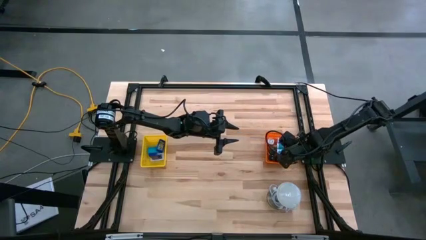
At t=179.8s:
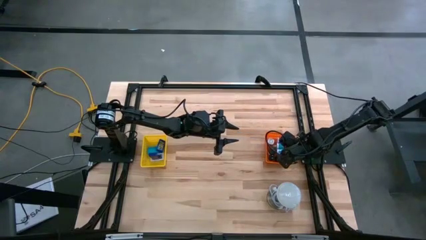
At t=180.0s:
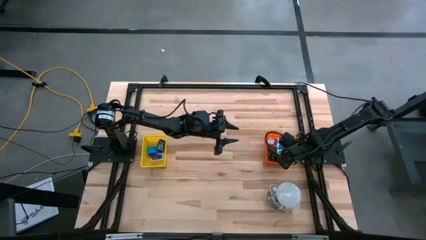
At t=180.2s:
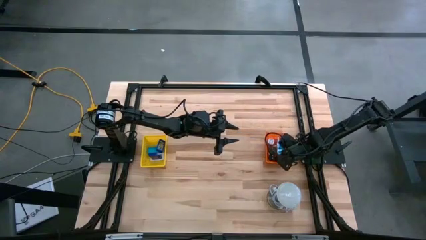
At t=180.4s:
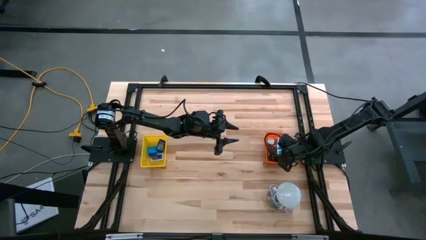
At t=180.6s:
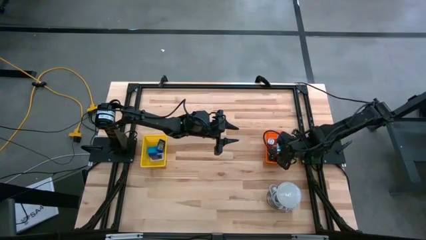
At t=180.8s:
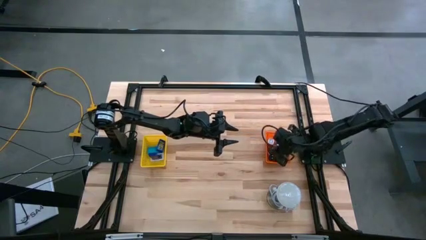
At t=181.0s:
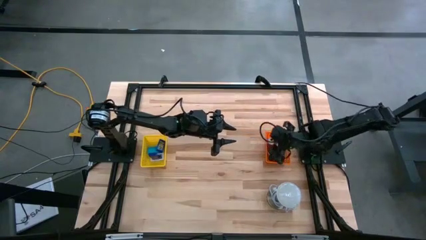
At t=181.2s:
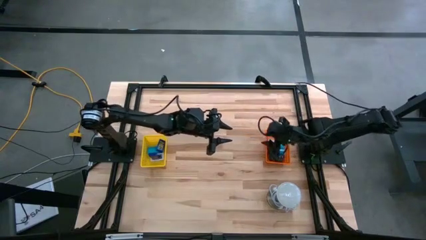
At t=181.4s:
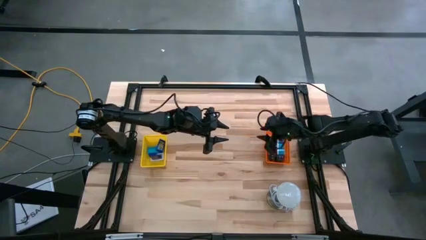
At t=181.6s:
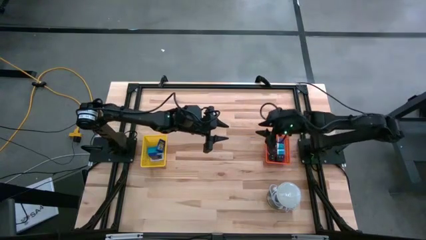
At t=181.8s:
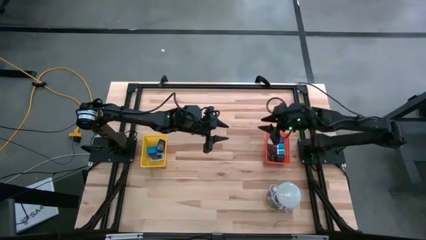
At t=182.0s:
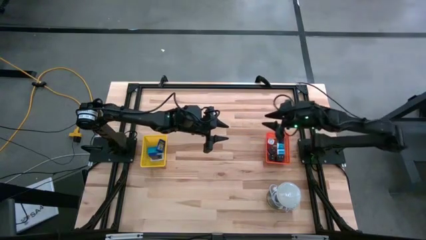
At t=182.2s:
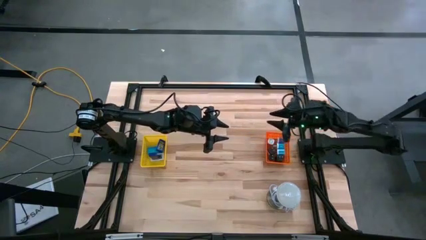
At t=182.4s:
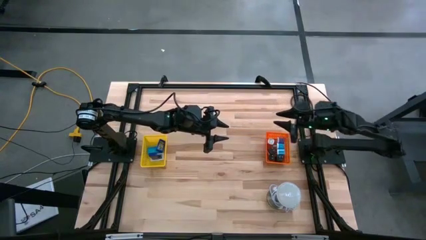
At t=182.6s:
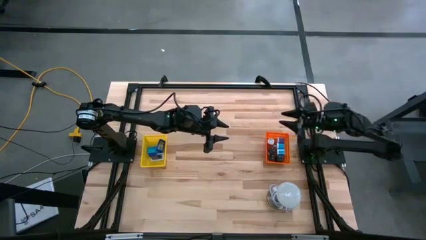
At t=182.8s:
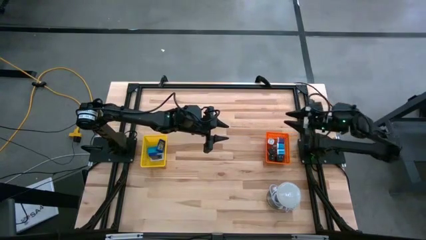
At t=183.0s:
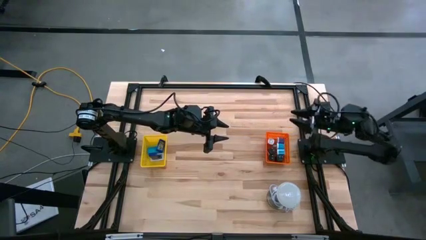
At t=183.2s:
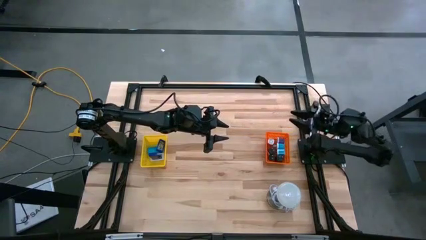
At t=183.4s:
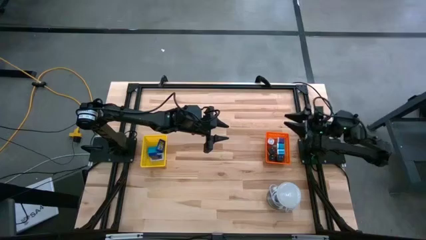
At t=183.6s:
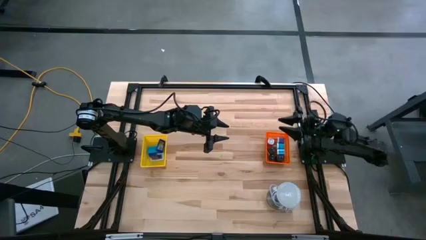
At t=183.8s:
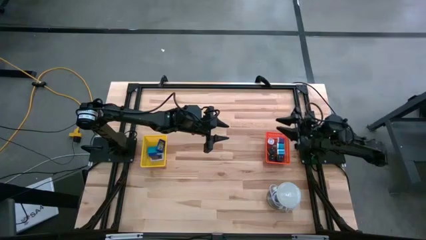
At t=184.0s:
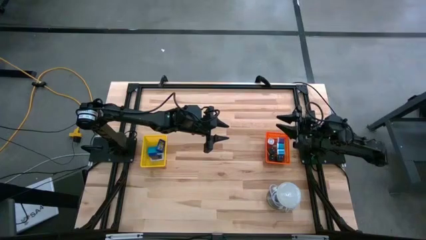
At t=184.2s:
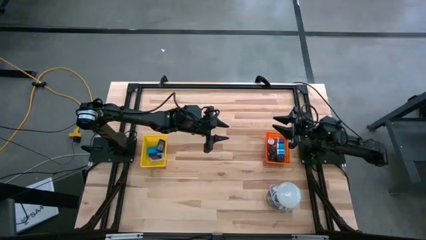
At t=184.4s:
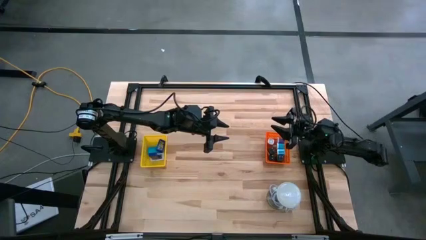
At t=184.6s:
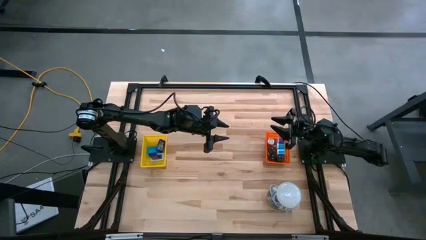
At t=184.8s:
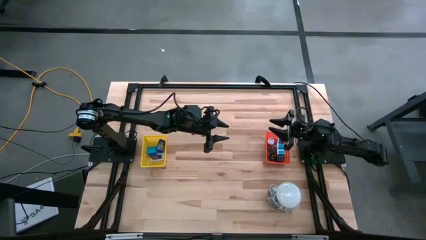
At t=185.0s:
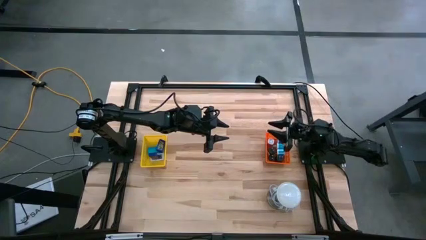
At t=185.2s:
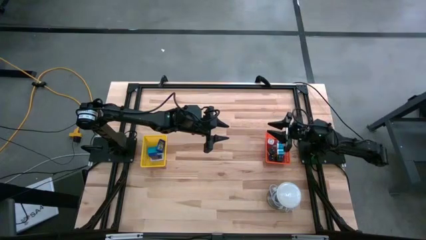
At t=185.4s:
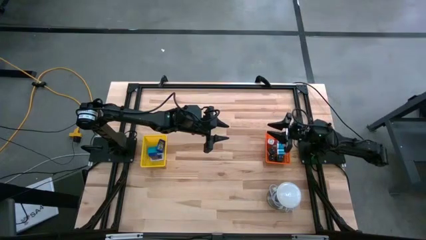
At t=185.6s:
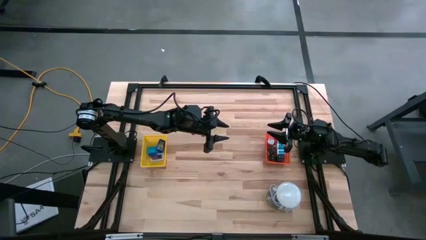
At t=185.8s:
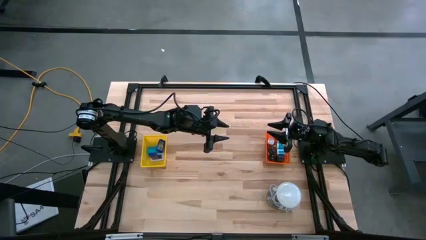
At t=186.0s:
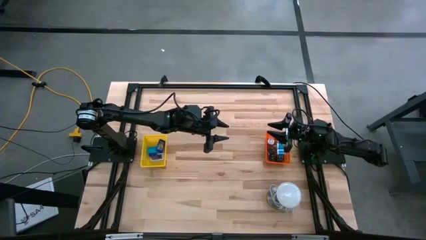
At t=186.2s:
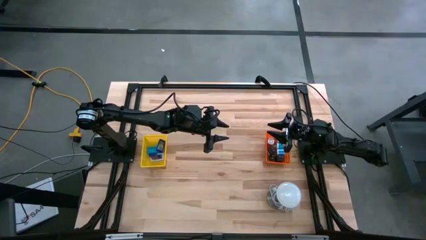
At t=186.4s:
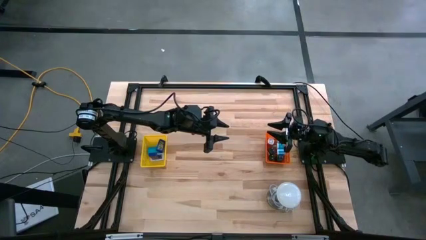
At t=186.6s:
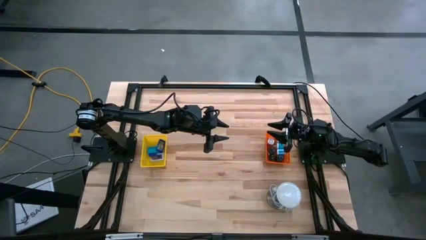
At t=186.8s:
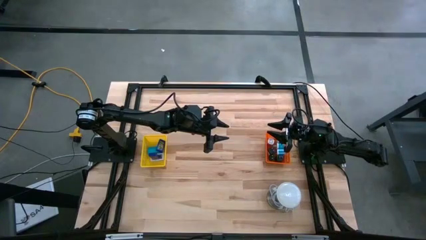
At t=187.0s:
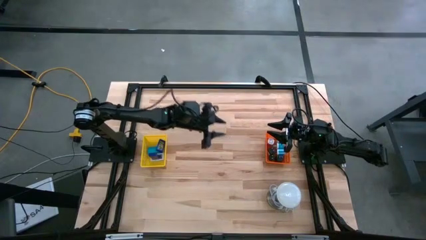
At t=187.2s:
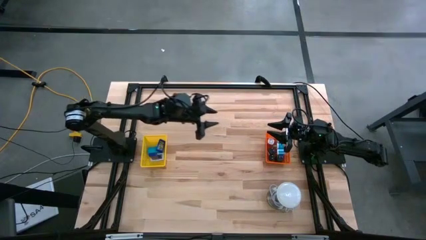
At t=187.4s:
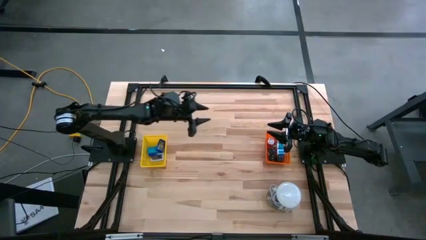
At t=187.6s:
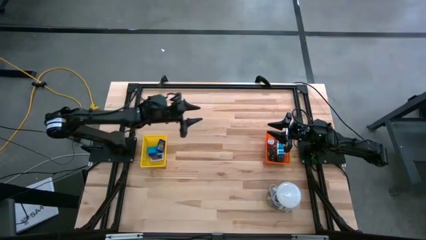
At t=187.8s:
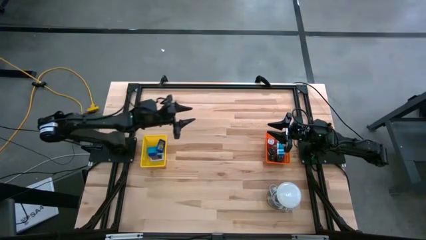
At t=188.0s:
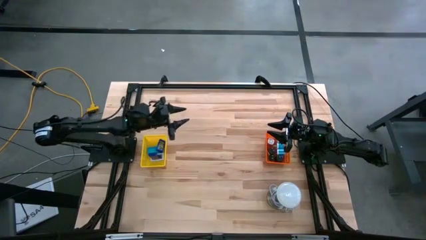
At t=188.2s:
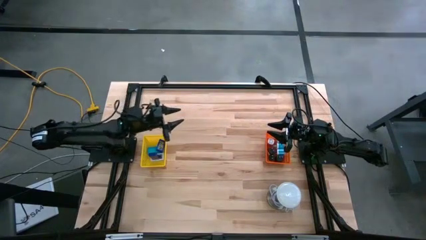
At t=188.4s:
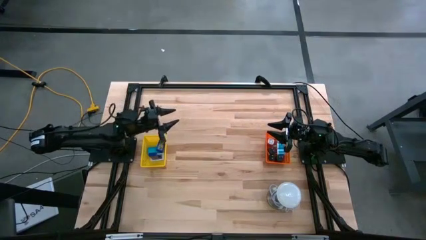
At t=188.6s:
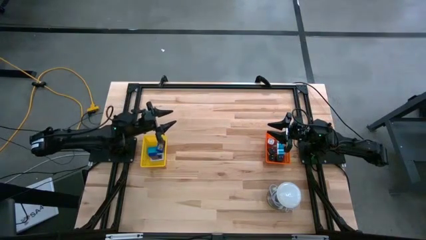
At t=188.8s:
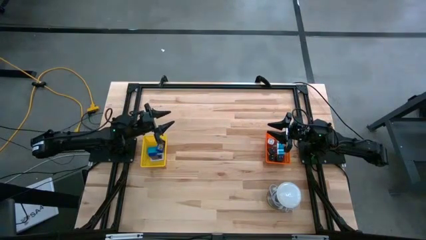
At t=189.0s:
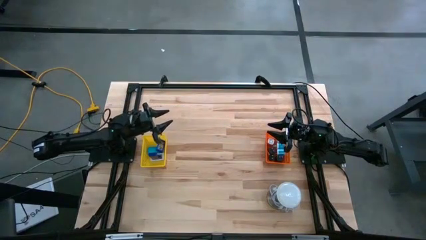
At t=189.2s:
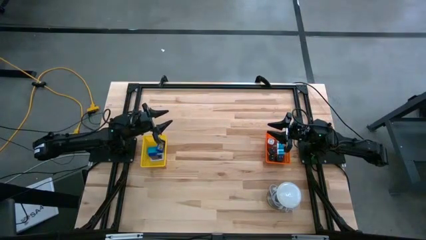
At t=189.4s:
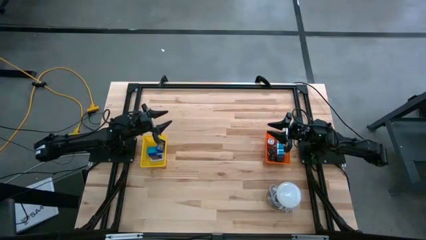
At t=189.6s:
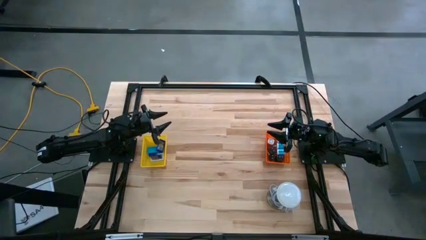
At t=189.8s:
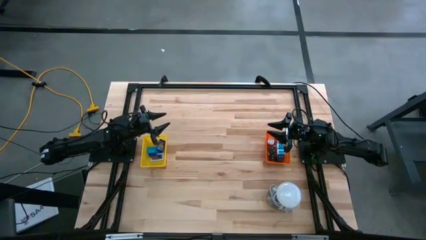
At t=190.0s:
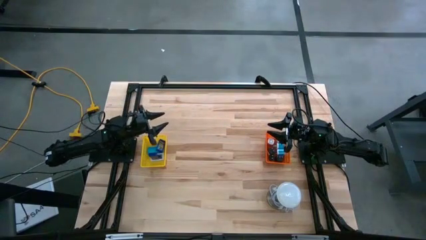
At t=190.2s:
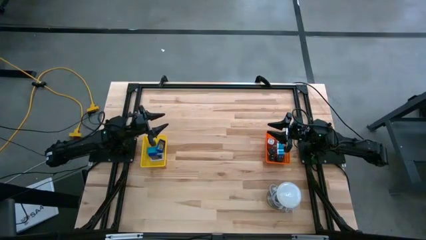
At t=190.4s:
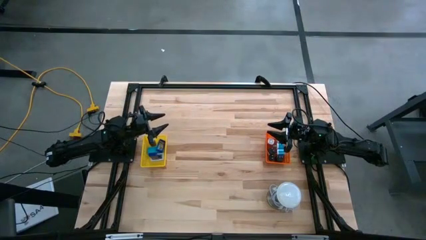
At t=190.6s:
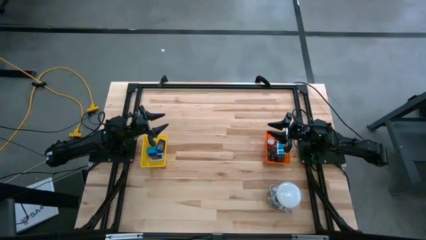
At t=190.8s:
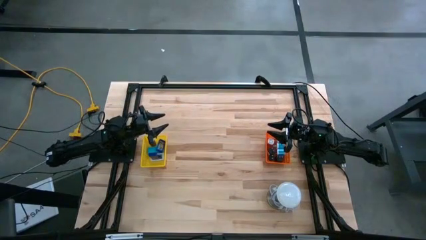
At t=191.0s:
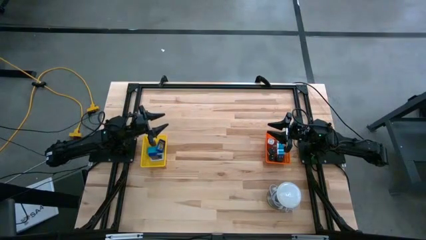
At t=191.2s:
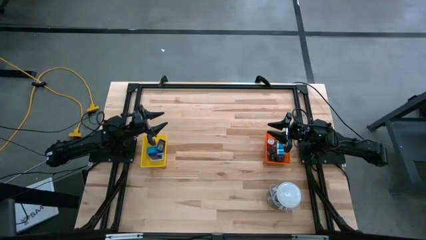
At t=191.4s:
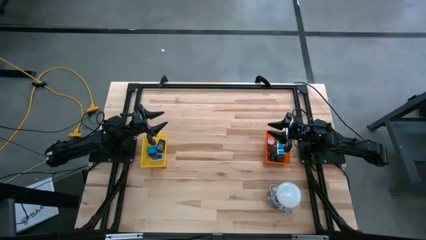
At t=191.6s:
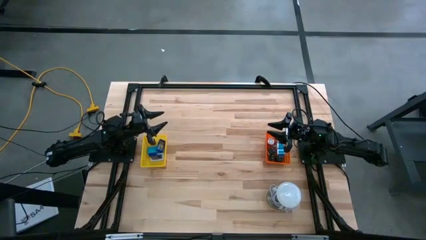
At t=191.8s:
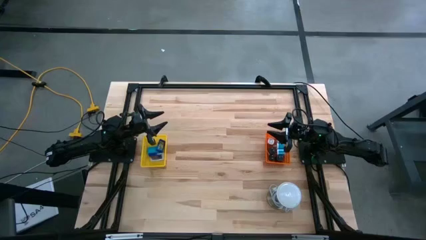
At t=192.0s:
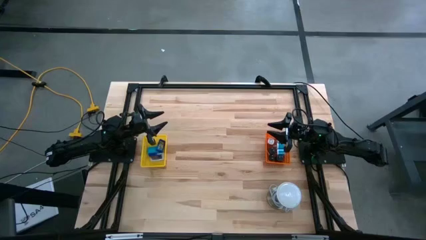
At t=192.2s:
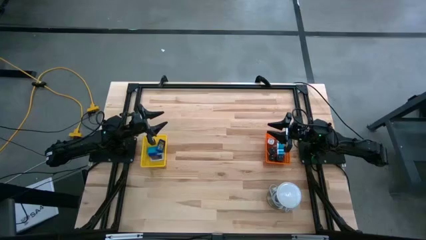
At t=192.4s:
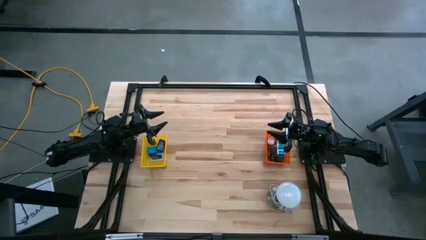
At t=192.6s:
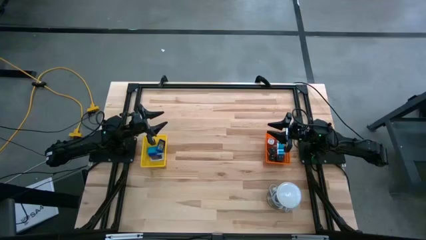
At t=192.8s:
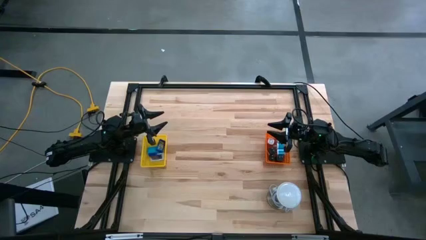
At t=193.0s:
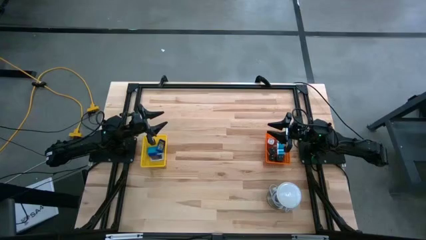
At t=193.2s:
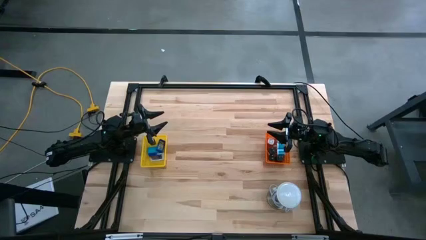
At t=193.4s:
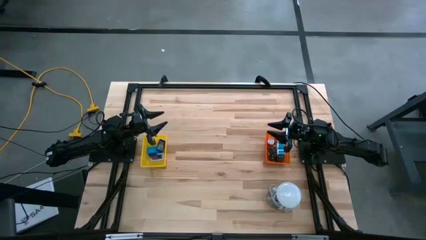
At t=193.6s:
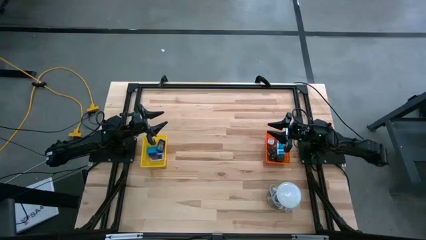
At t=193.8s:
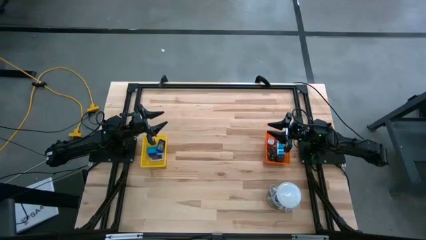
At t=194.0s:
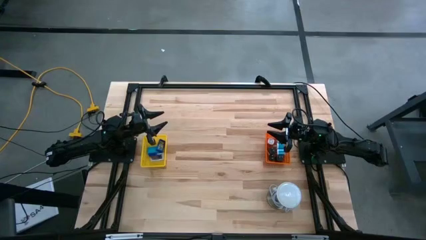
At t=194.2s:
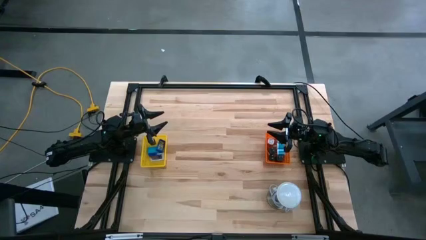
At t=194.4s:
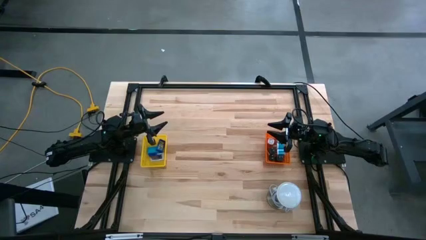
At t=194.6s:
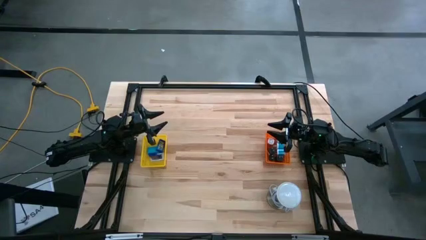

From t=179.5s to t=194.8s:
Task: Pick & Place Office items
Return to Home Position
